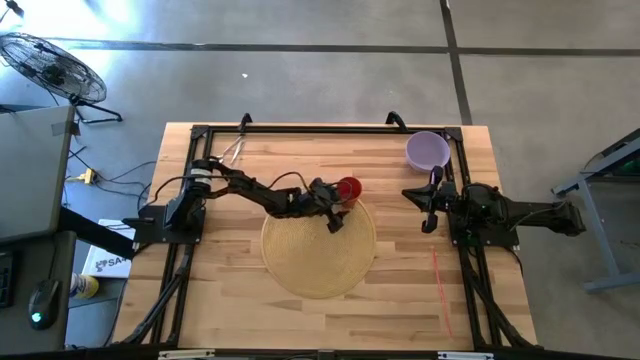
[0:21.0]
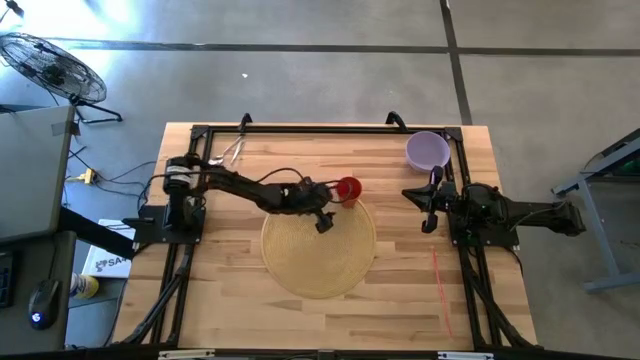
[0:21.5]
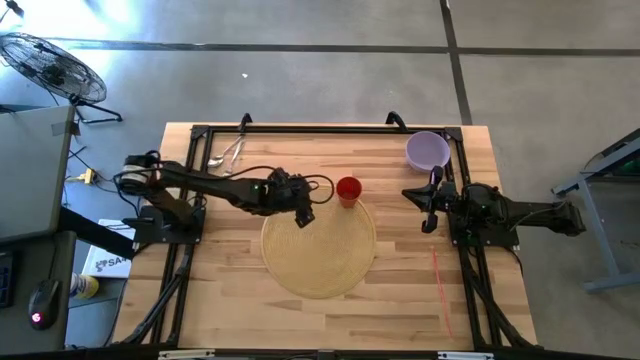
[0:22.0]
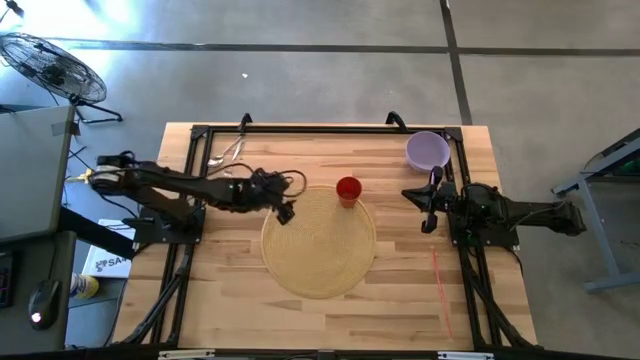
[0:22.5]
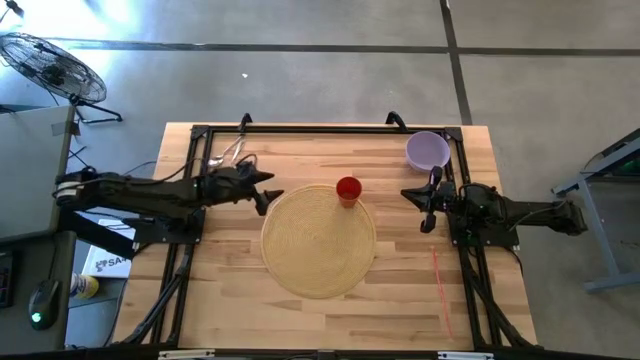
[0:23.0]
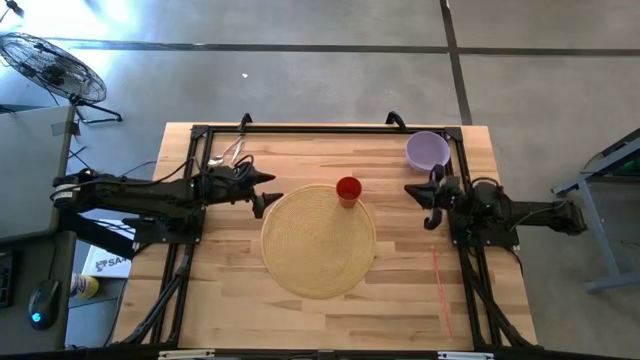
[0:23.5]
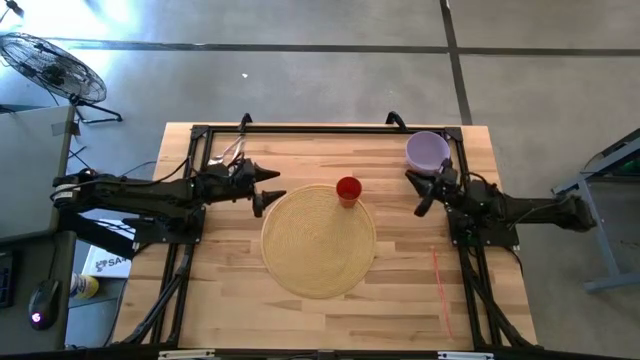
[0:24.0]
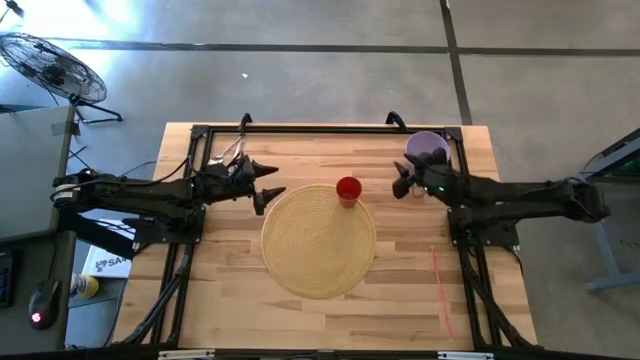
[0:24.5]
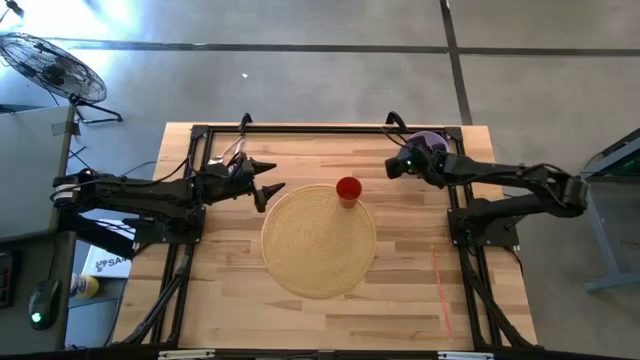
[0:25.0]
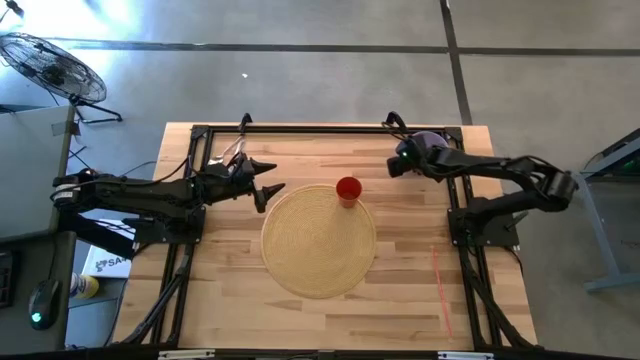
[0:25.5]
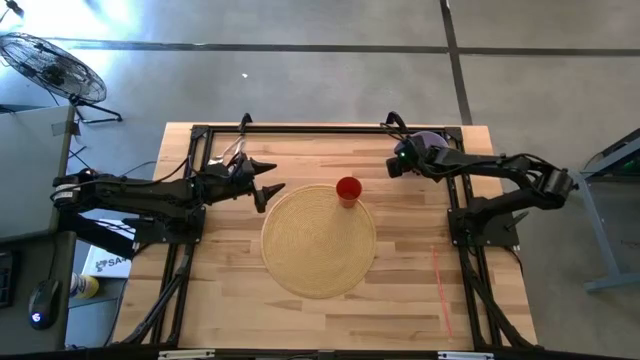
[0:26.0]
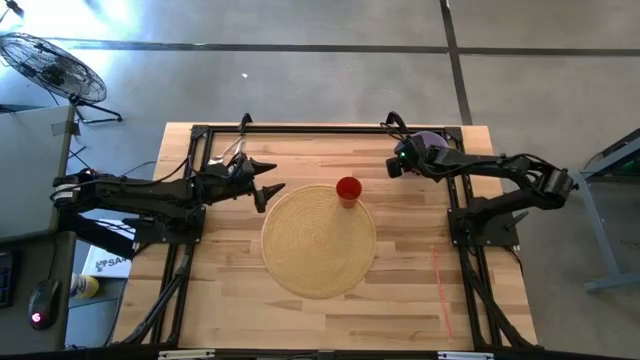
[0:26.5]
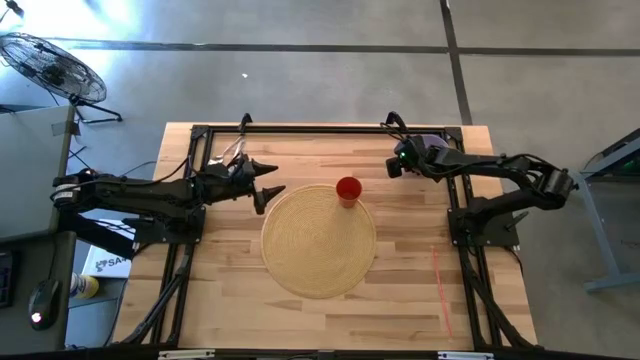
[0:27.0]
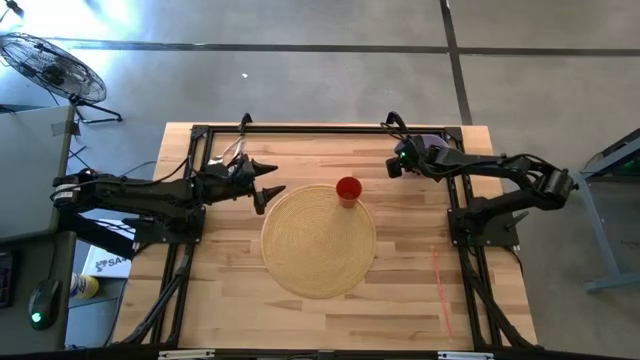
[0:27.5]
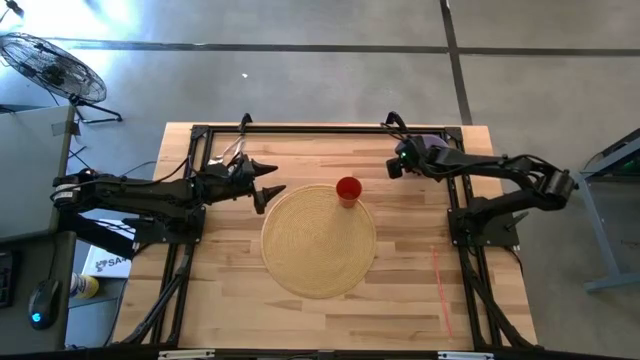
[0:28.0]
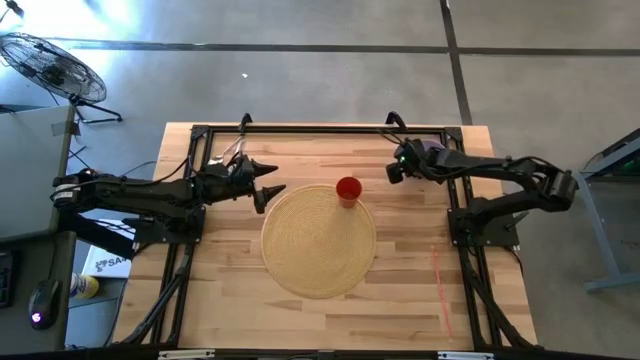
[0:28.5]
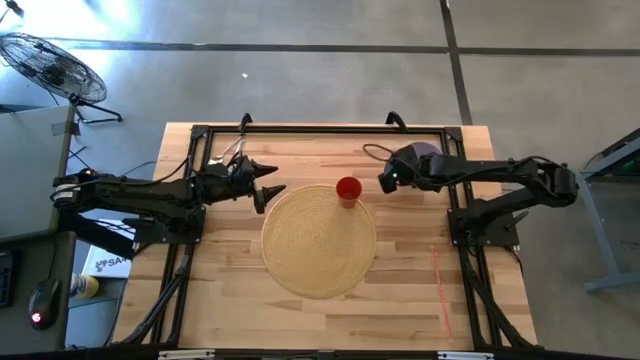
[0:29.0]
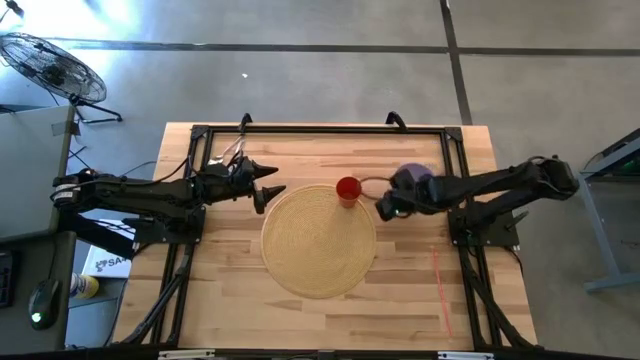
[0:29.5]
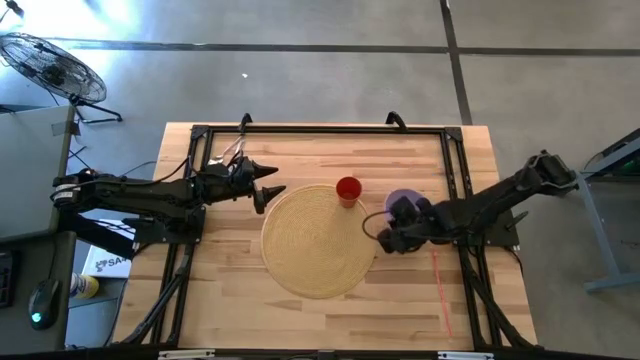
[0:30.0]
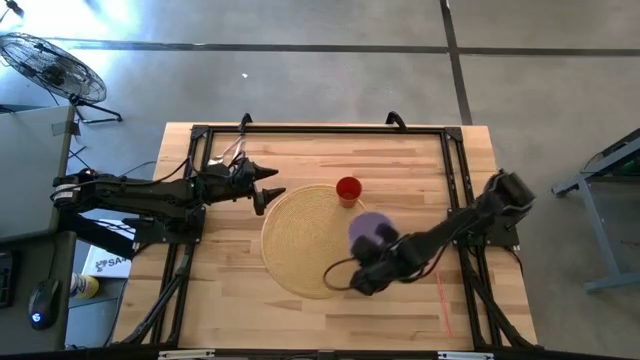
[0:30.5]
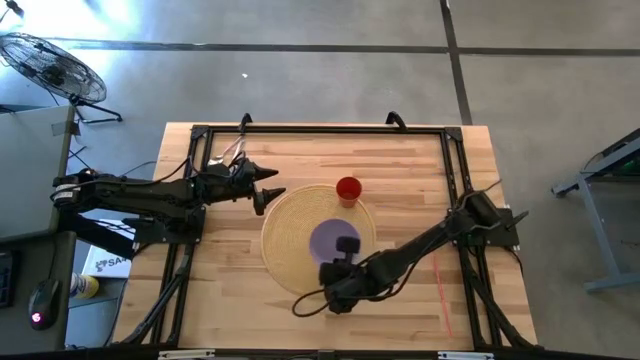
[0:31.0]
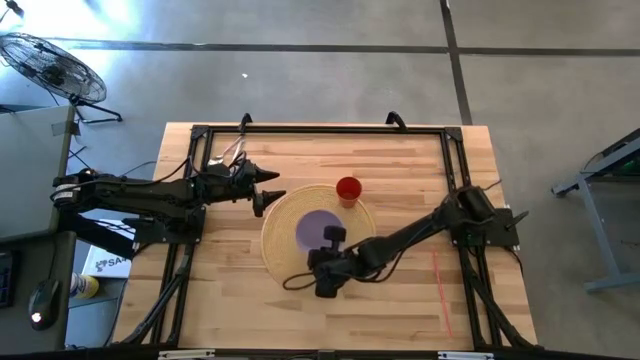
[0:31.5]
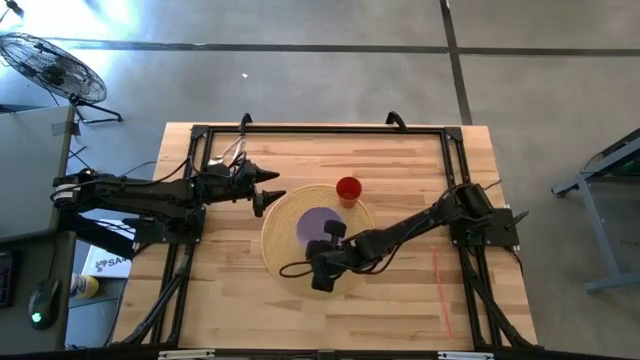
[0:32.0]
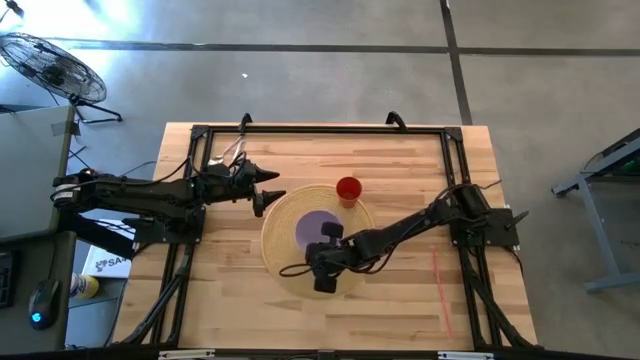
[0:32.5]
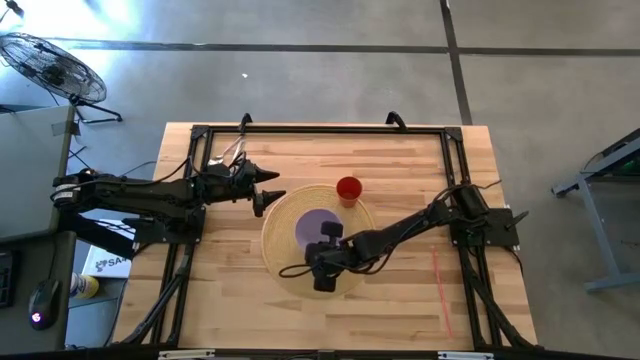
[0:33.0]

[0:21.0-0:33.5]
Task: Pick & Place Utensil
Put the violet bowl in the center of the placemat to the bottom left of the orange cup

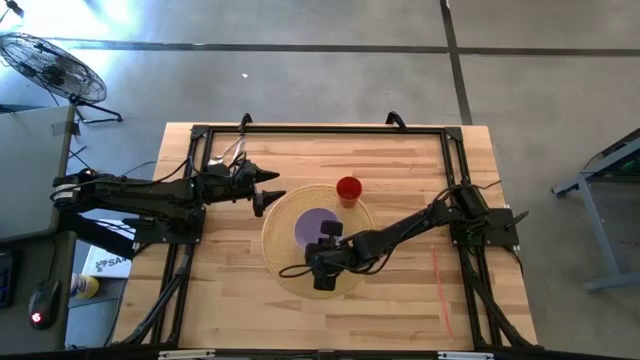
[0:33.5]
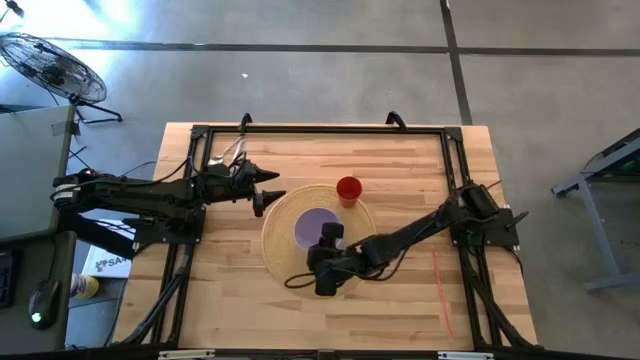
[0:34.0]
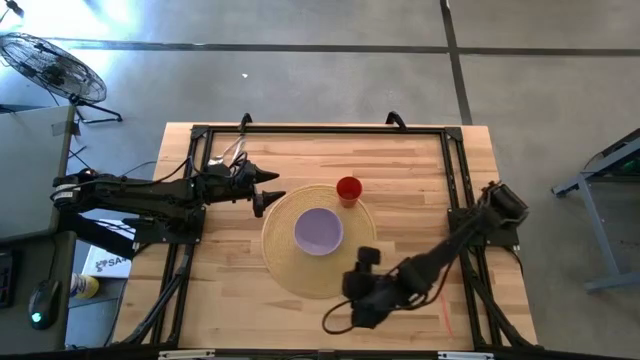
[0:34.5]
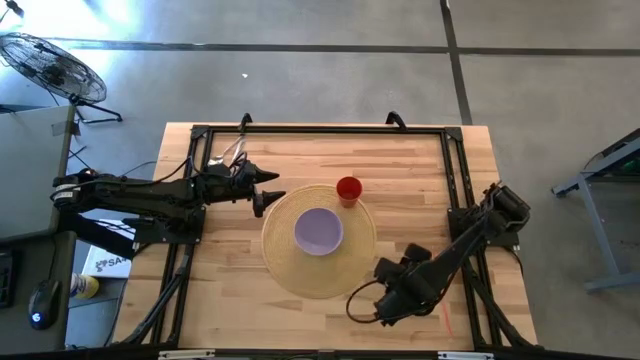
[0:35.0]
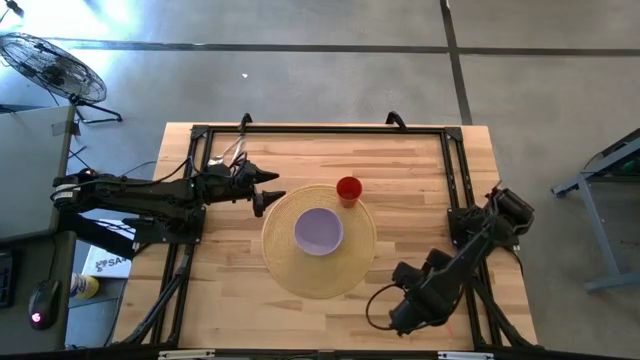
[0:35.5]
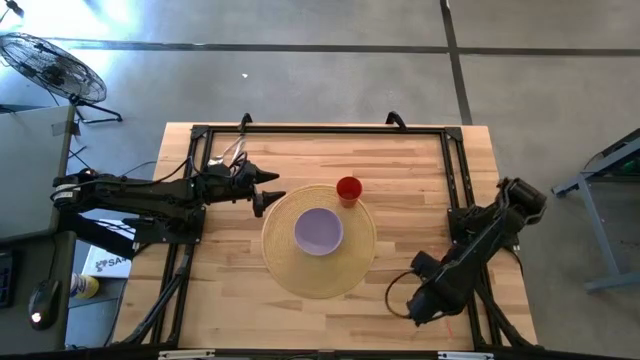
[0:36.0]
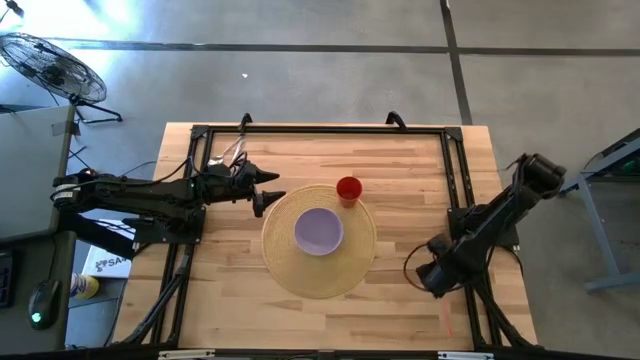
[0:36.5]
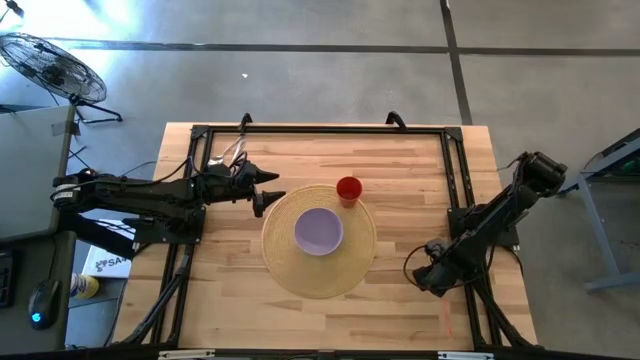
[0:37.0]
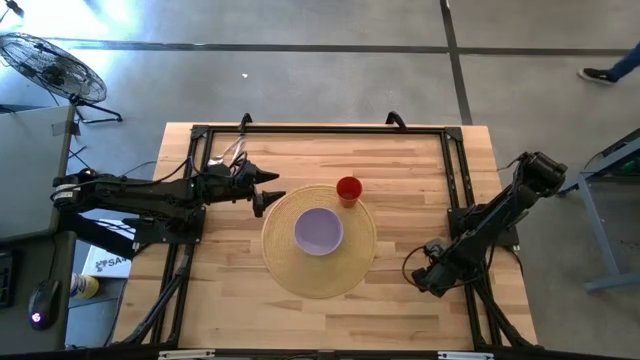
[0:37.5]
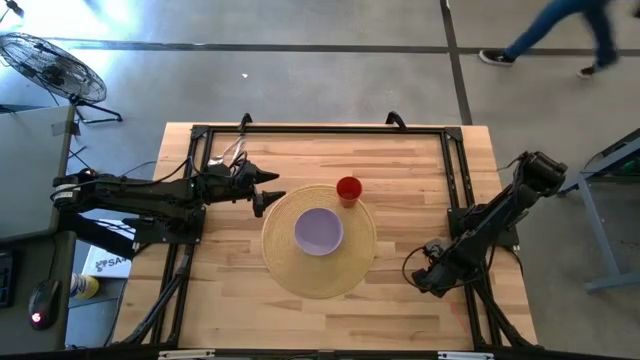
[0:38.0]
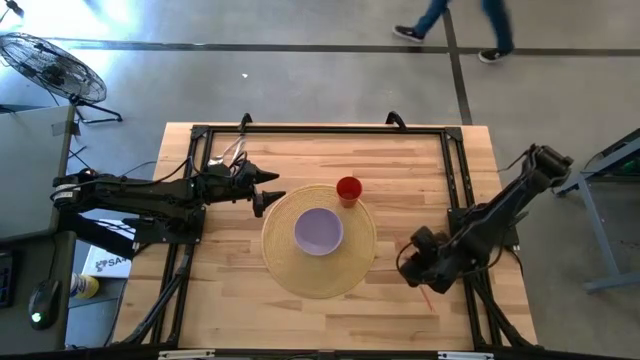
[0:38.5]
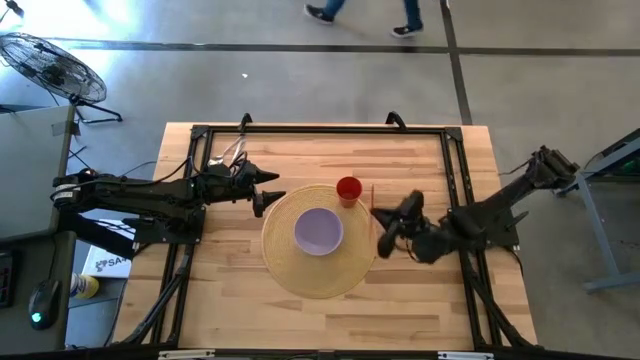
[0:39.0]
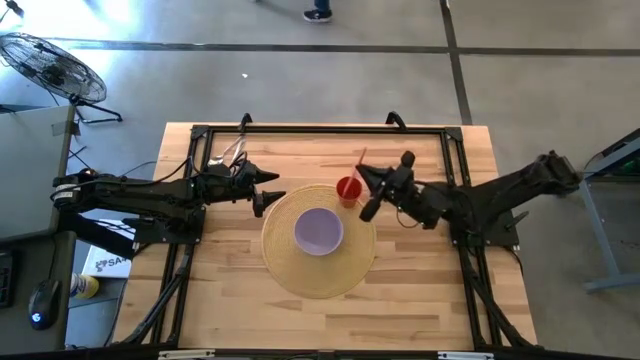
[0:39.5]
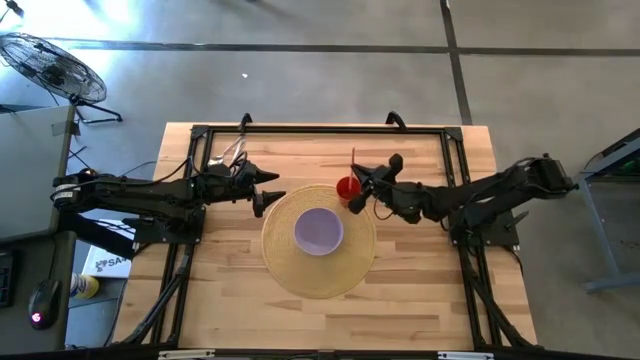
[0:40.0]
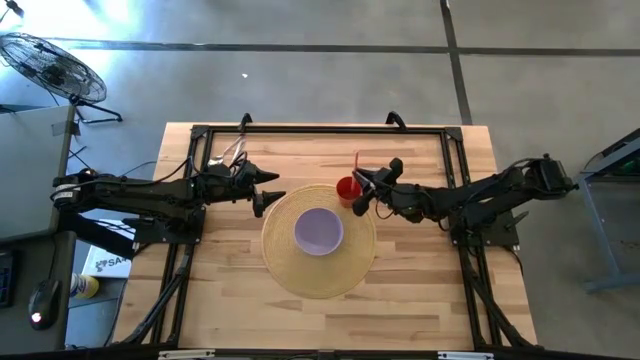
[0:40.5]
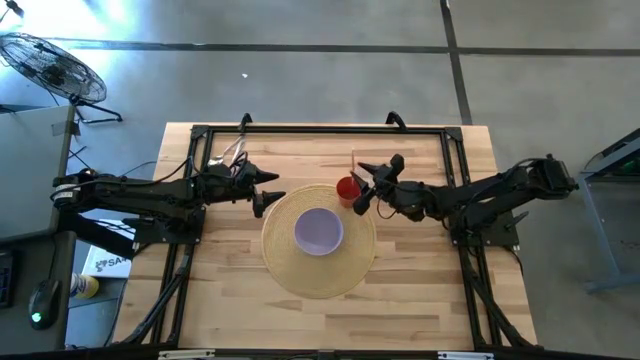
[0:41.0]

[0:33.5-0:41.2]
Put the orange straw into the orange cup
